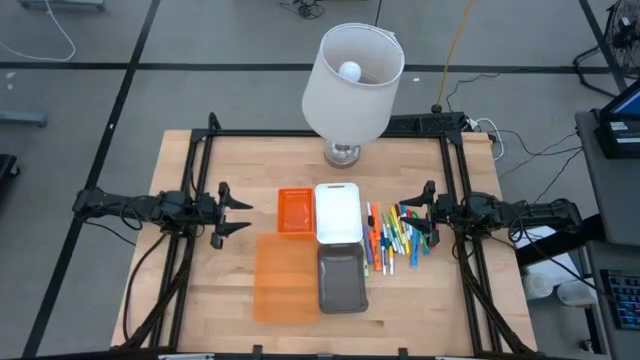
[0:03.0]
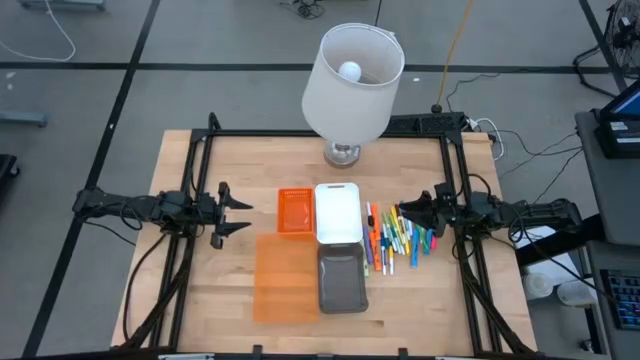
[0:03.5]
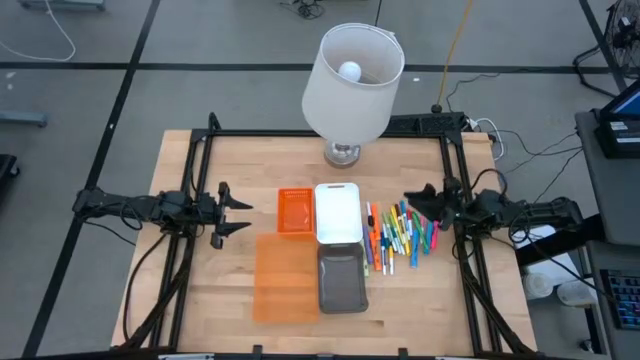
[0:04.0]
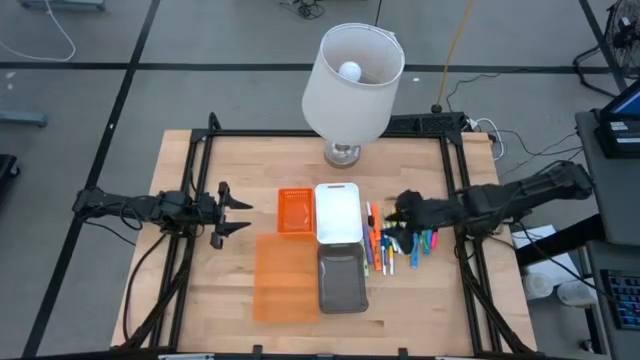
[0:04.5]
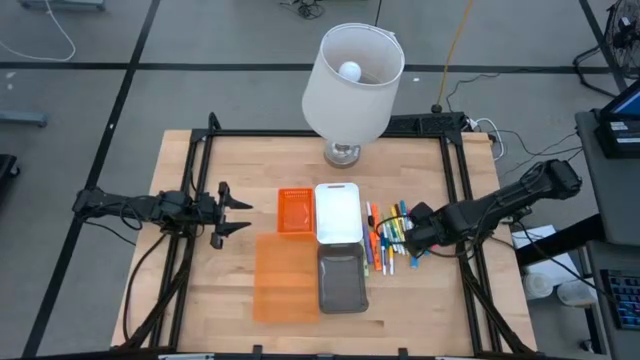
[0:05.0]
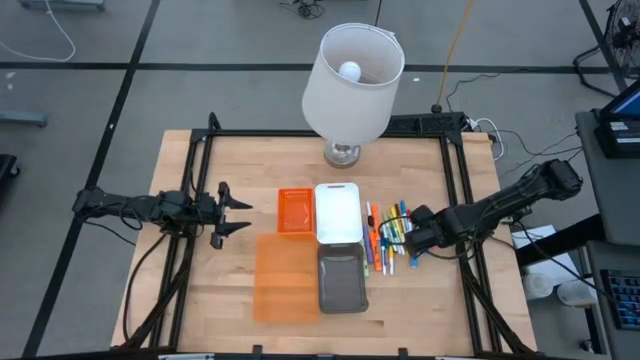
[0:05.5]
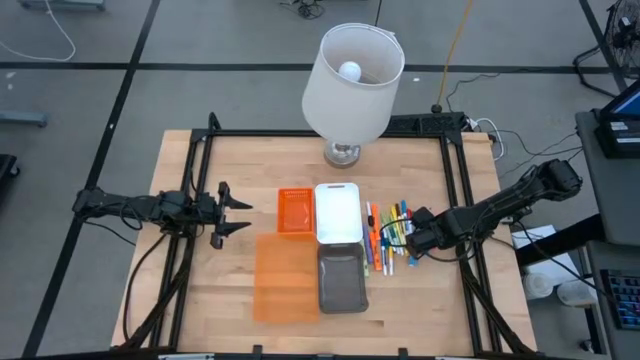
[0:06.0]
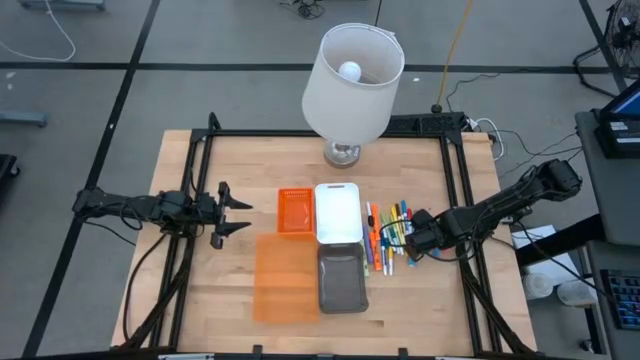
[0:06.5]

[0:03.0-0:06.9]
Task: Pick & Place Markers
Put the green pen into the orange basket

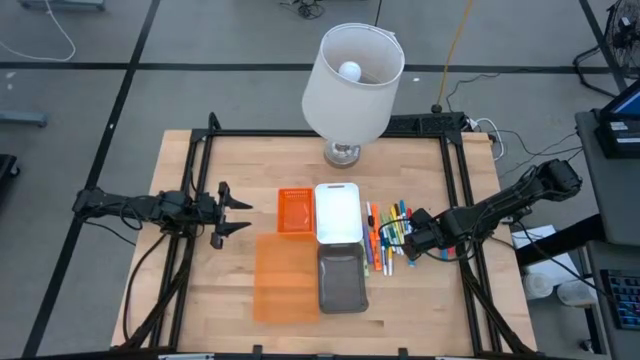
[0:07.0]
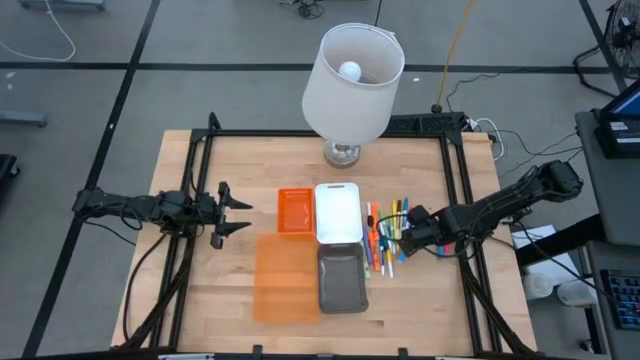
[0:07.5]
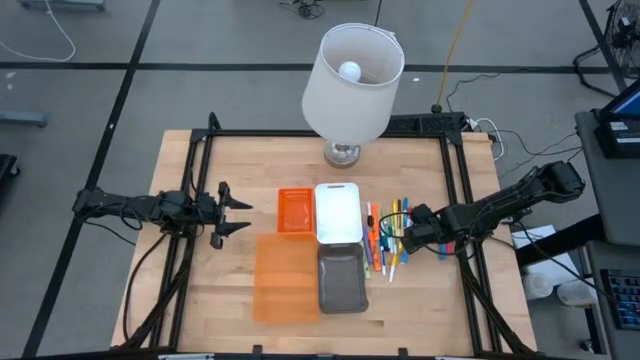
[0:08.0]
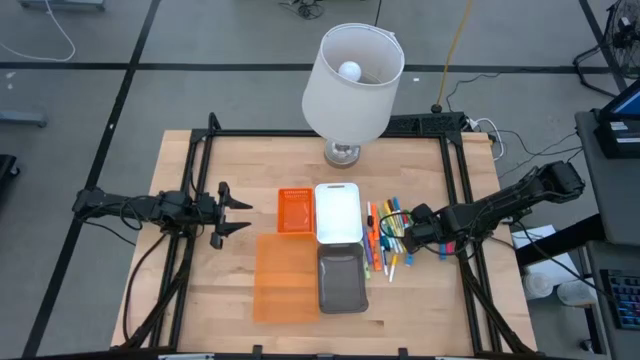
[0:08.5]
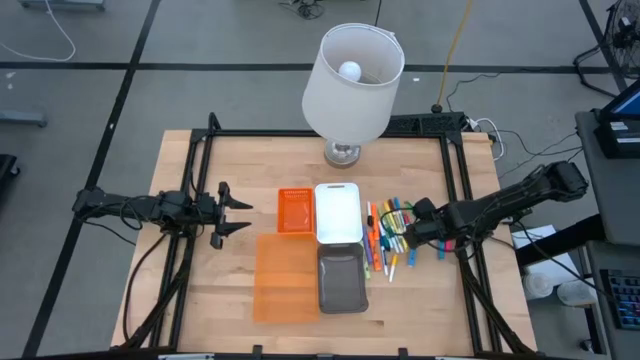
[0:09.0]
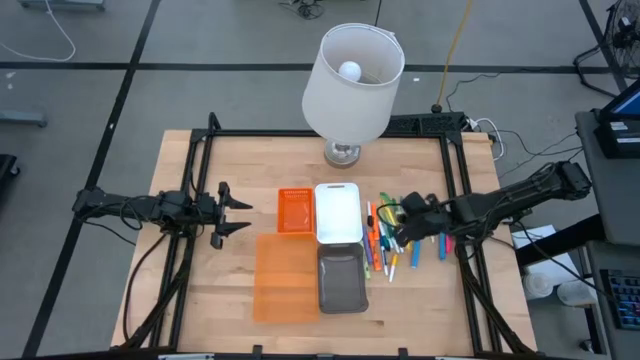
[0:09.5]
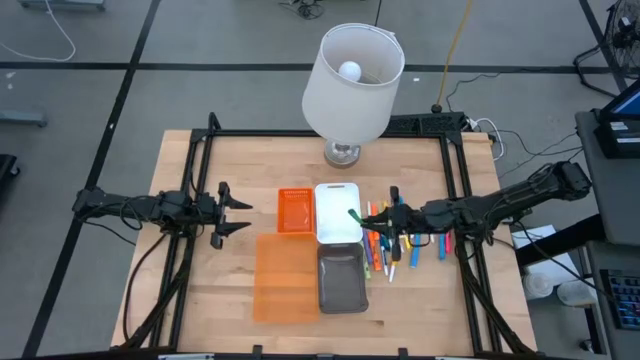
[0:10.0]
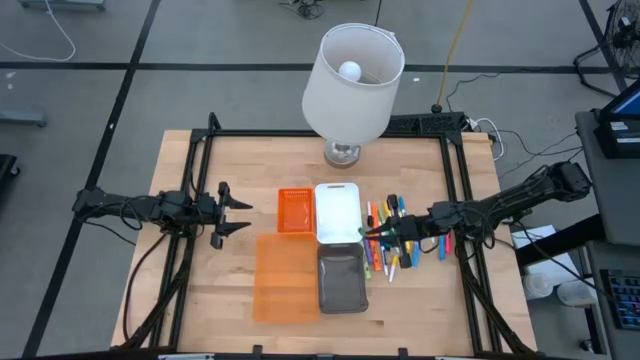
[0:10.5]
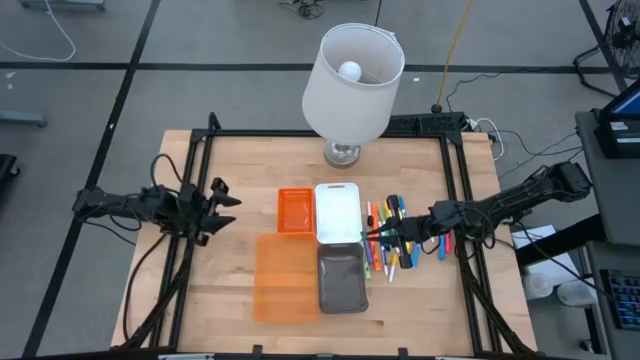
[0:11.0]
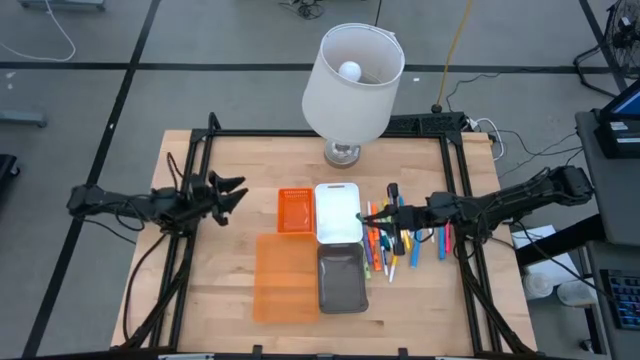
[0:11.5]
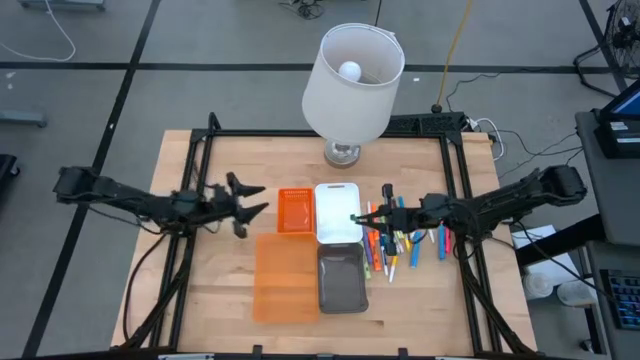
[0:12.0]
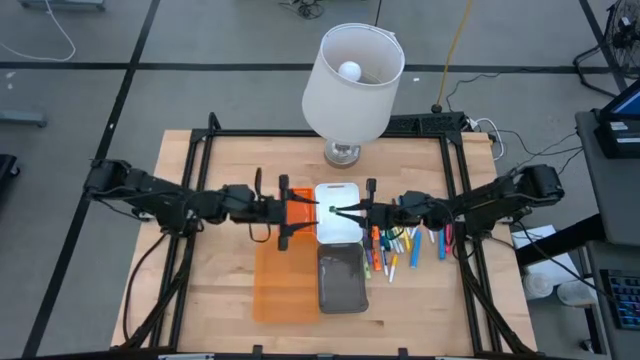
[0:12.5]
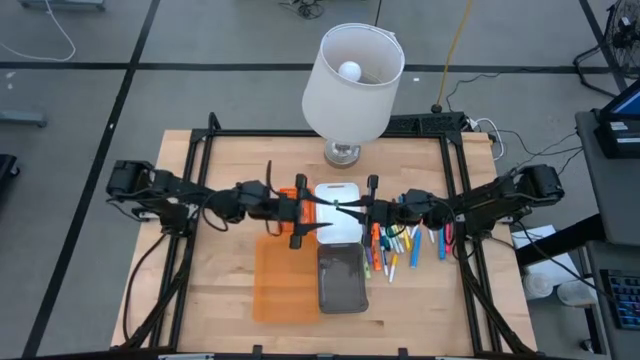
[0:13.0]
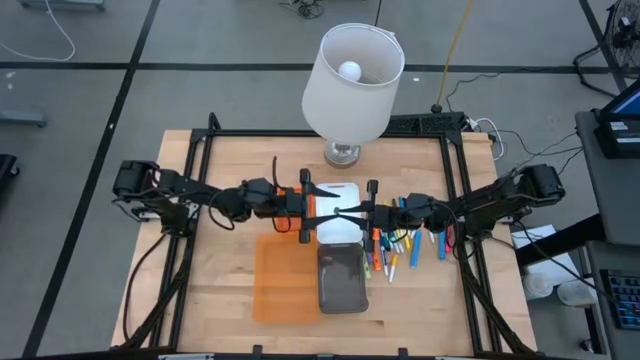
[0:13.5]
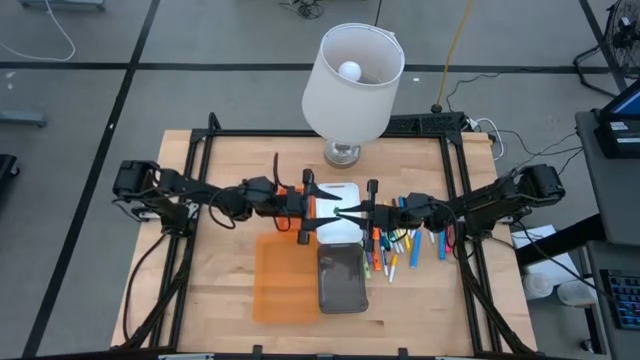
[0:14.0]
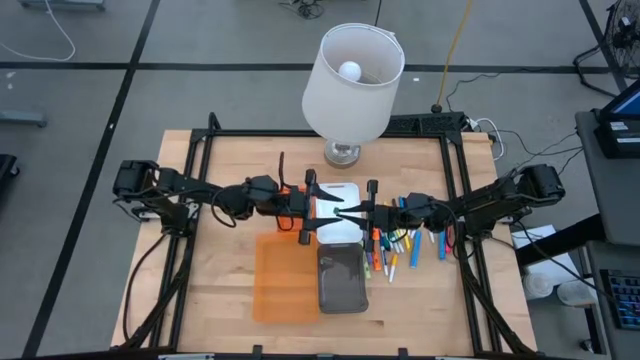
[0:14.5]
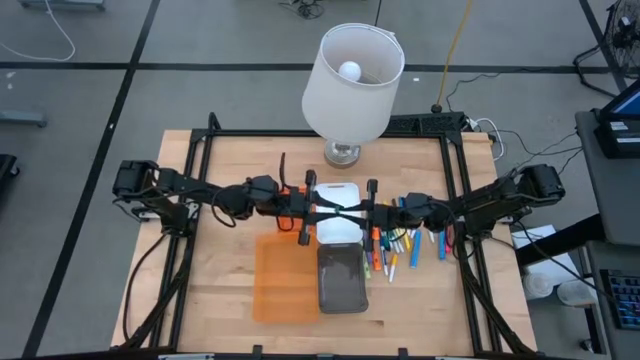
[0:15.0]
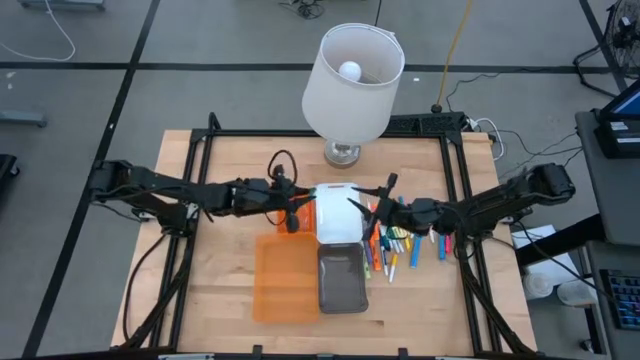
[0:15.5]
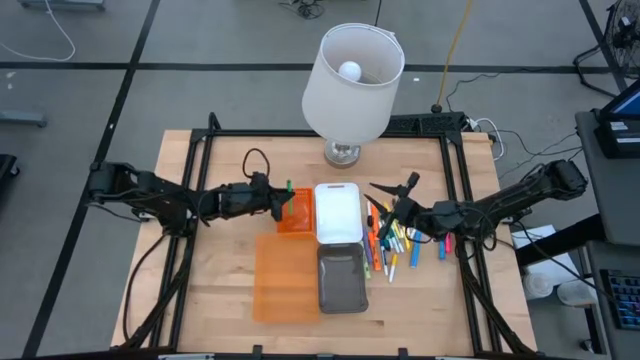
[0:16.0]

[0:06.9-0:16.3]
Put the green pen into the orange basket

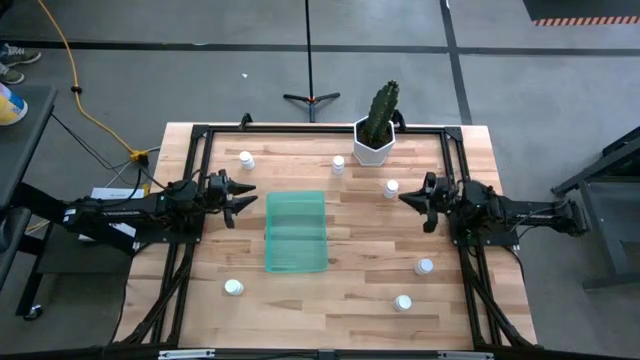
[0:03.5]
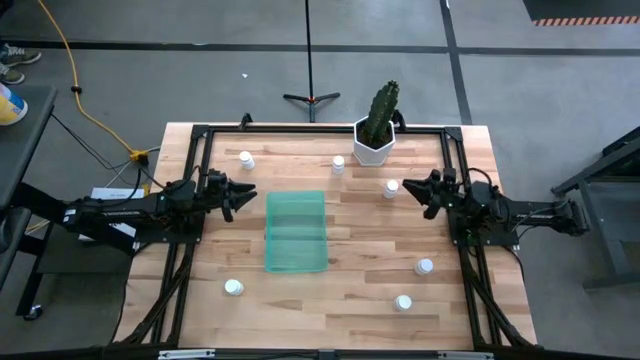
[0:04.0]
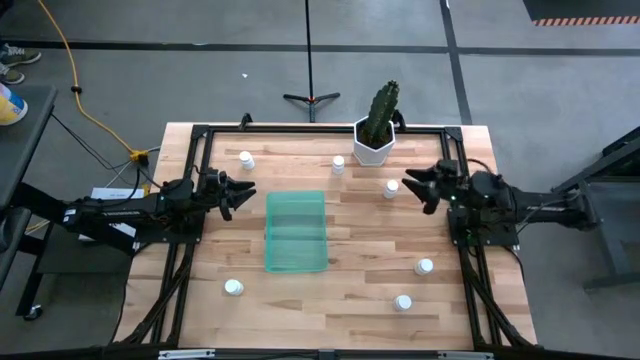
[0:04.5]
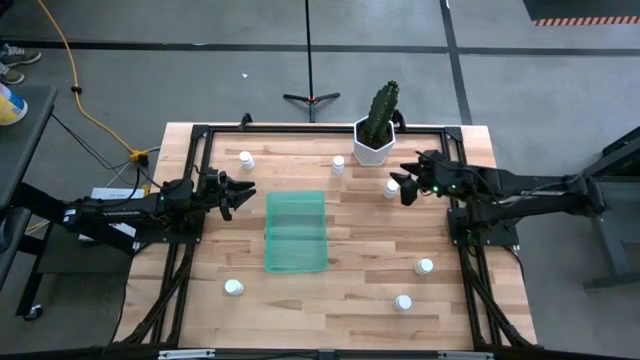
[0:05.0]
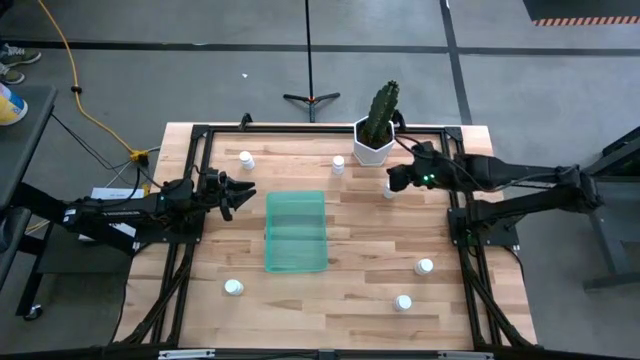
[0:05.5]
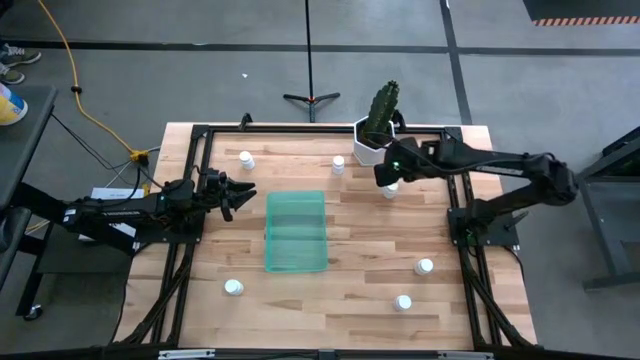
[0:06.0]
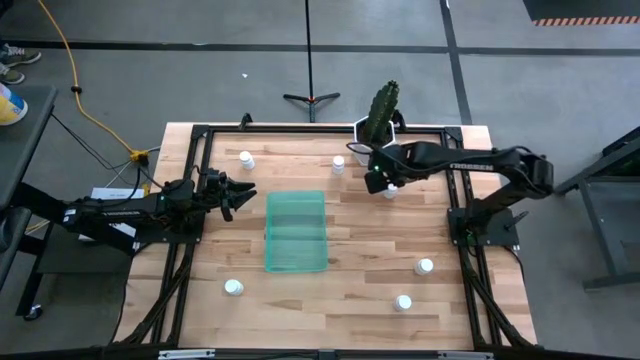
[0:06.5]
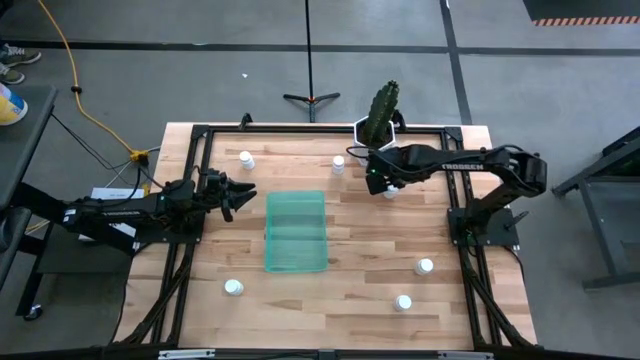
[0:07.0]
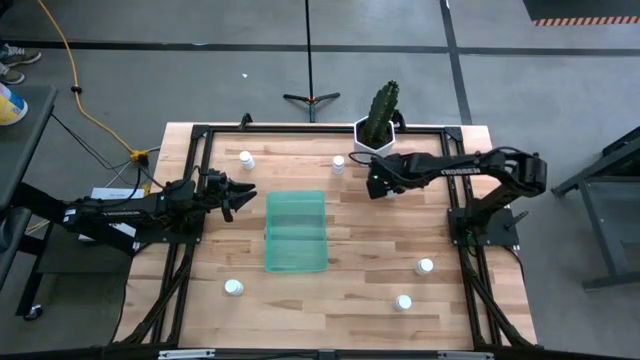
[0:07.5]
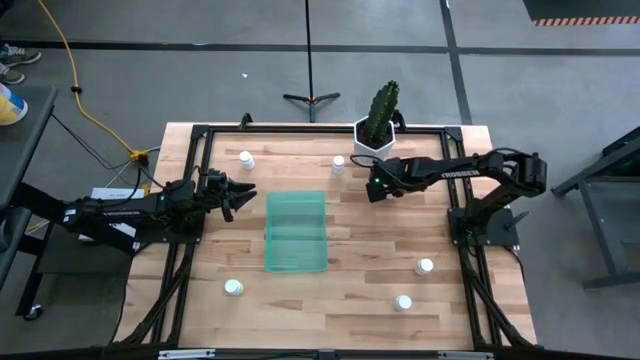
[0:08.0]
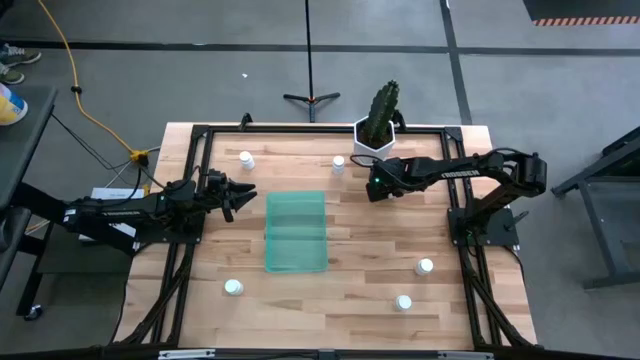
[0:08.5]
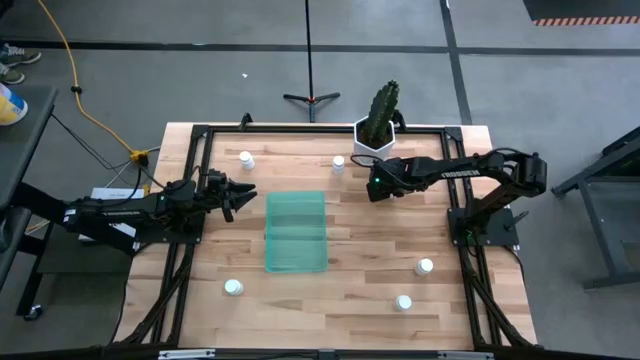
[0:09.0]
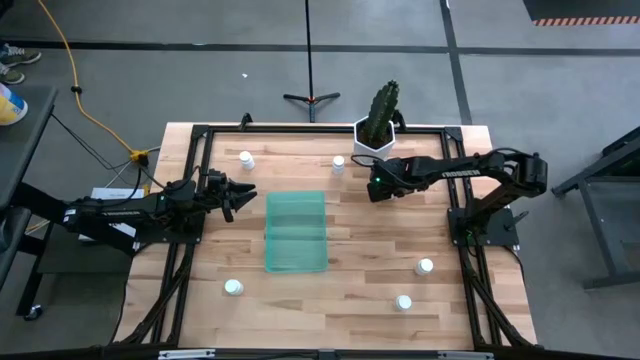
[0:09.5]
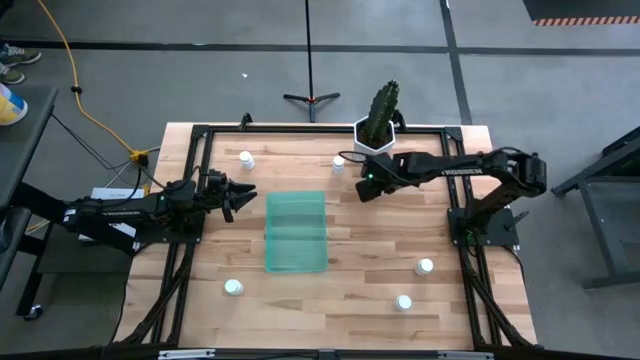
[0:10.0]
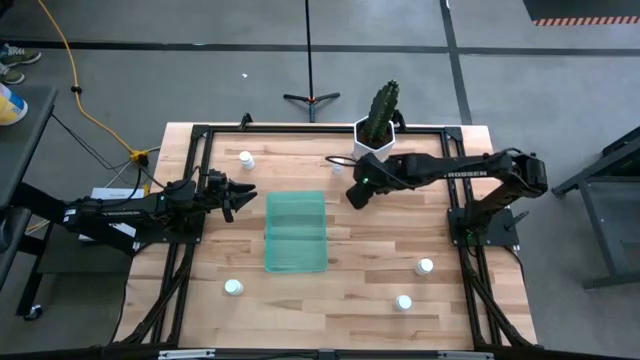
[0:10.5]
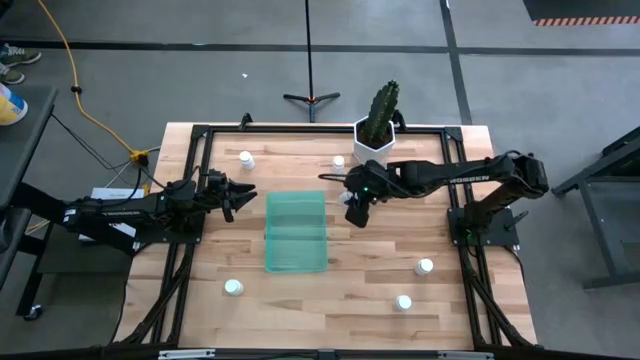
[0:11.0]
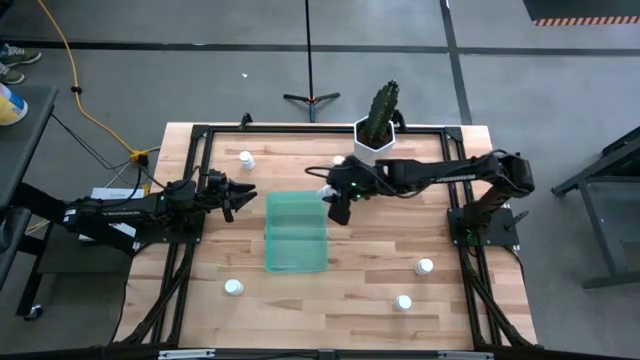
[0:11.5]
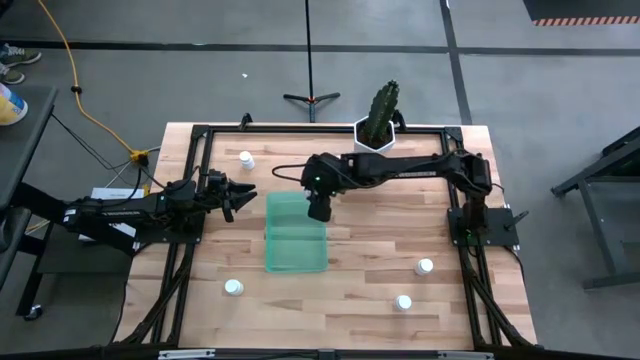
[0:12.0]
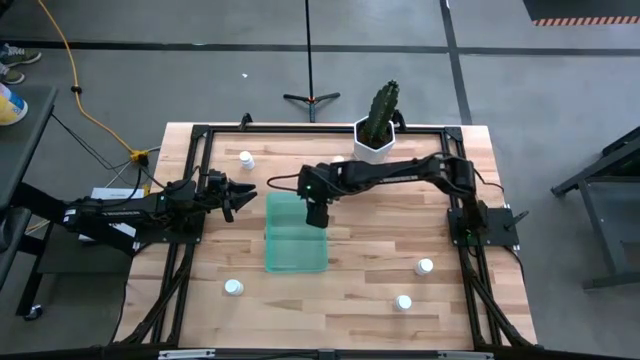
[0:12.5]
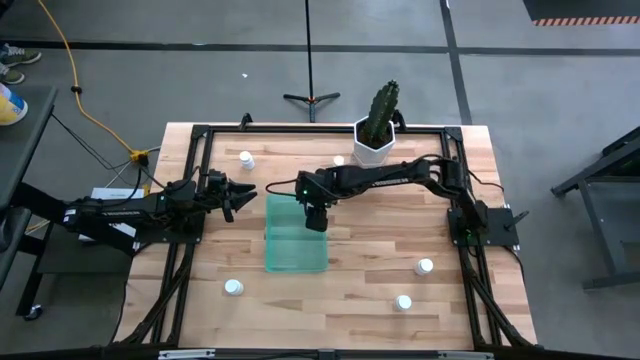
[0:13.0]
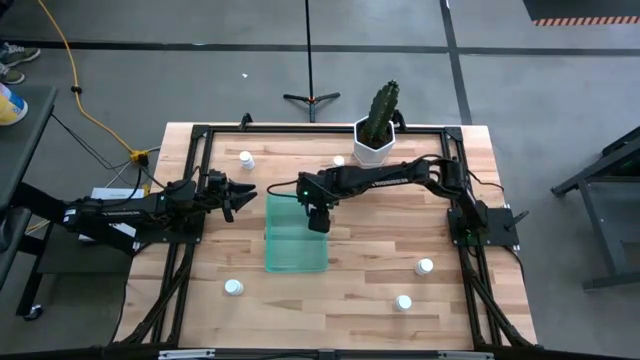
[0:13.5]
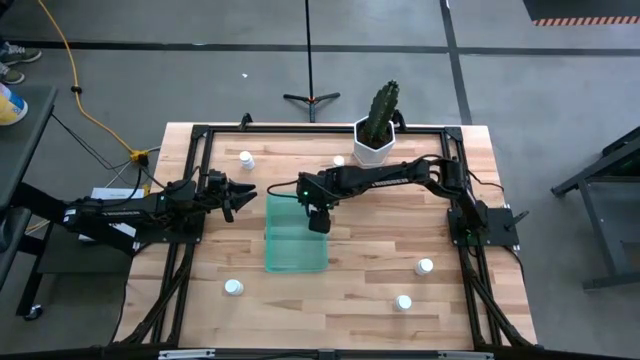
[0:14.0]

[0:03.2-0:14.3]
Task: Pick and place pill bottles into a basket
Put the pill bottle into the blue bin
